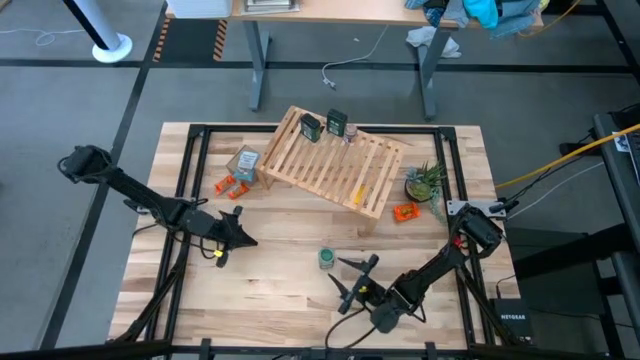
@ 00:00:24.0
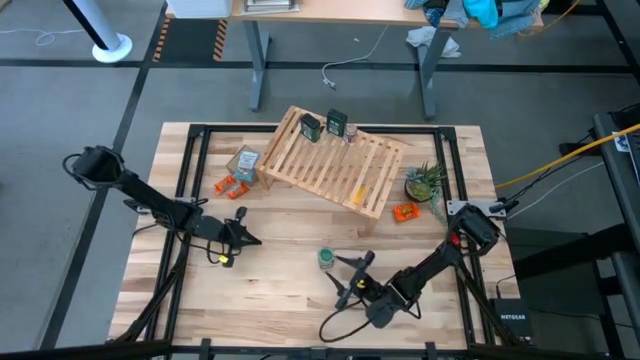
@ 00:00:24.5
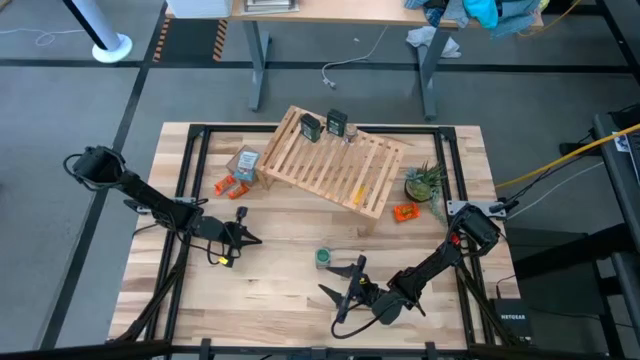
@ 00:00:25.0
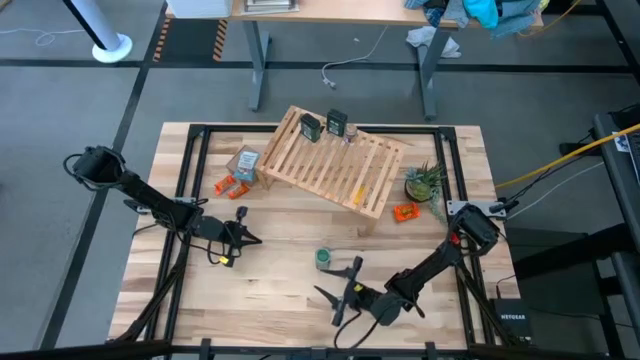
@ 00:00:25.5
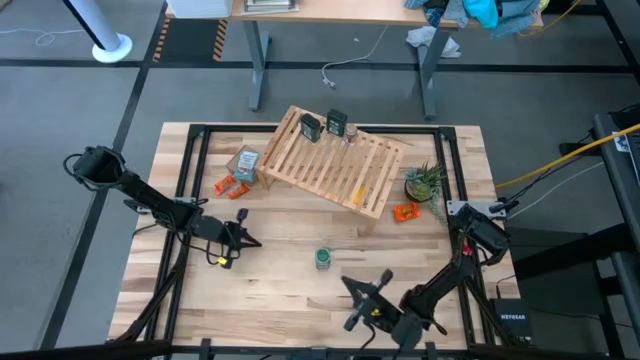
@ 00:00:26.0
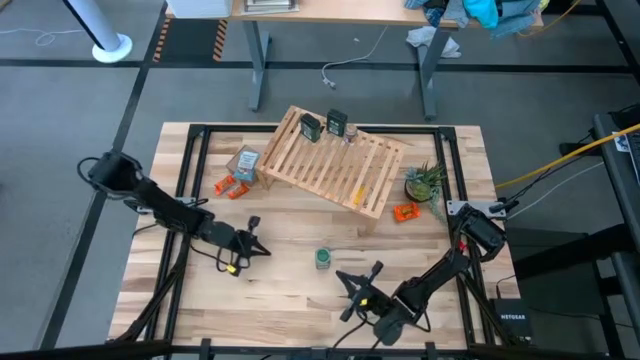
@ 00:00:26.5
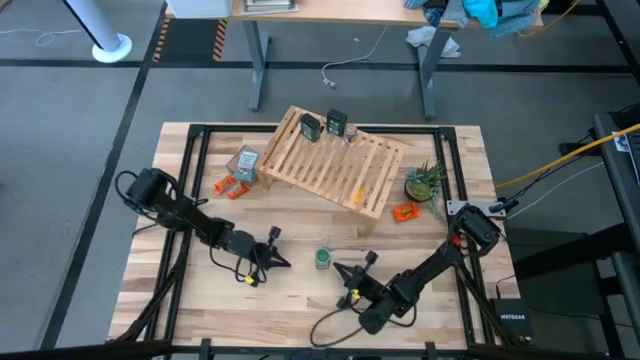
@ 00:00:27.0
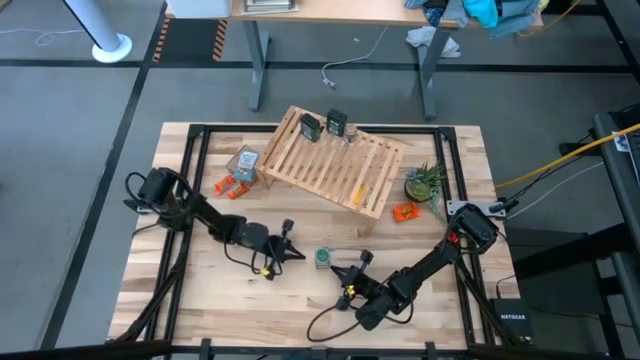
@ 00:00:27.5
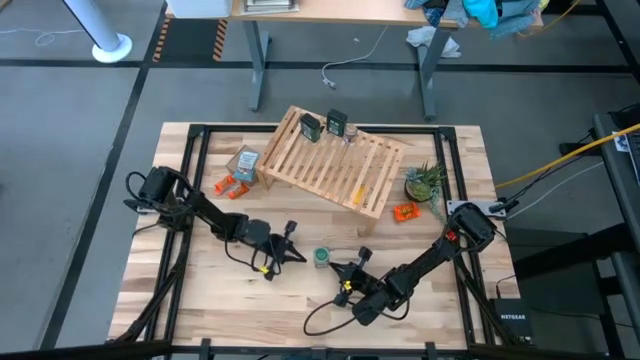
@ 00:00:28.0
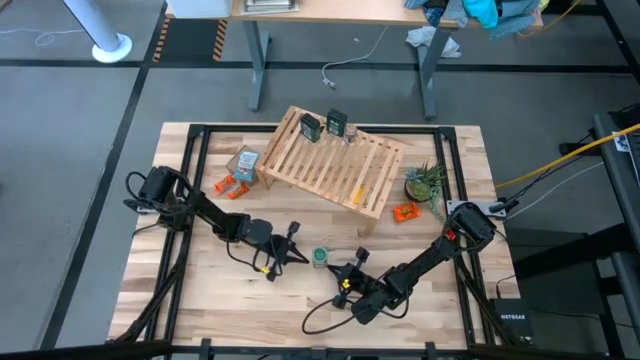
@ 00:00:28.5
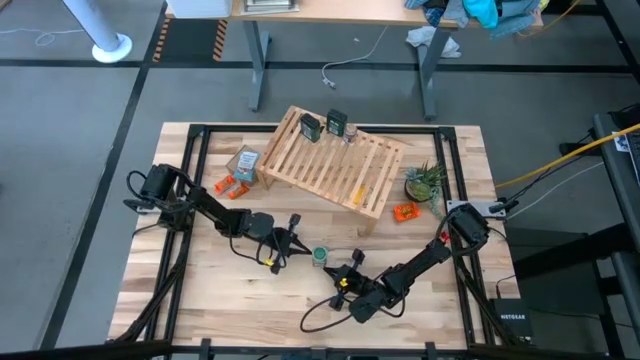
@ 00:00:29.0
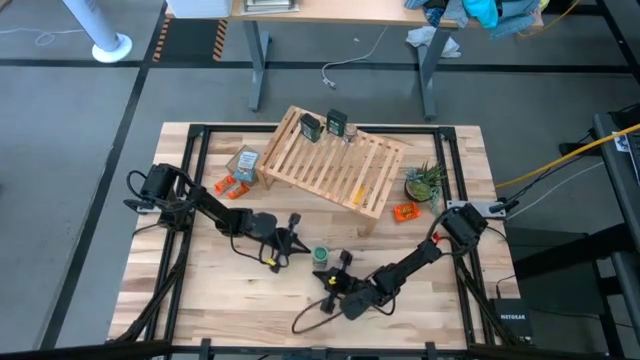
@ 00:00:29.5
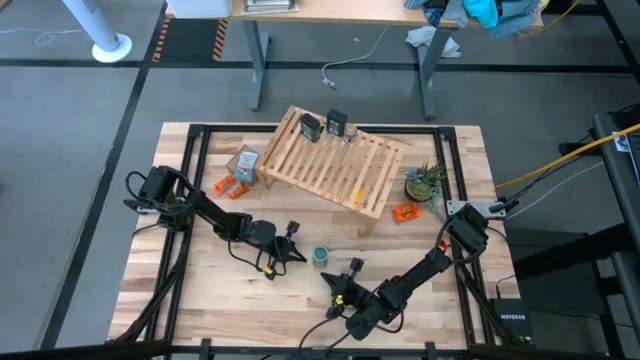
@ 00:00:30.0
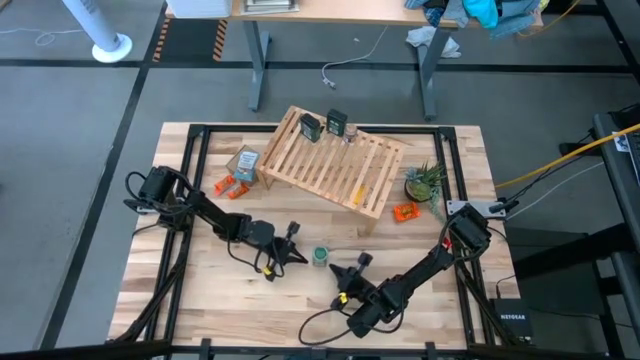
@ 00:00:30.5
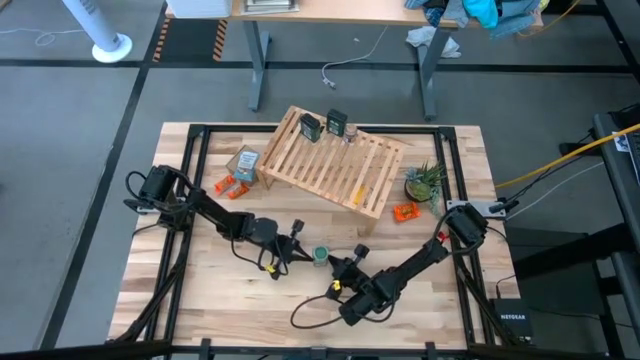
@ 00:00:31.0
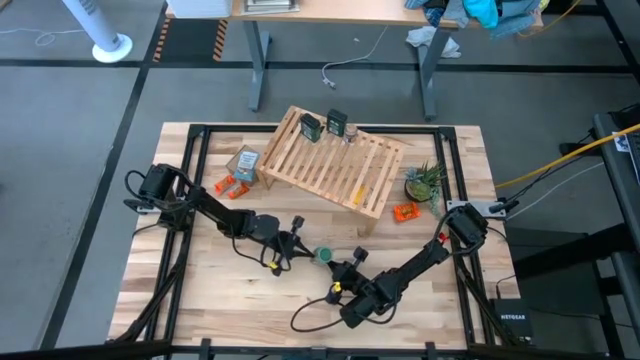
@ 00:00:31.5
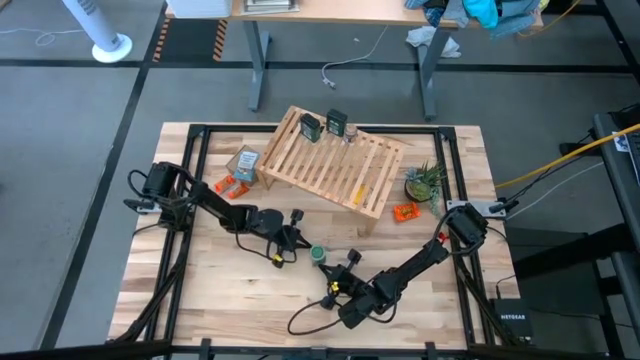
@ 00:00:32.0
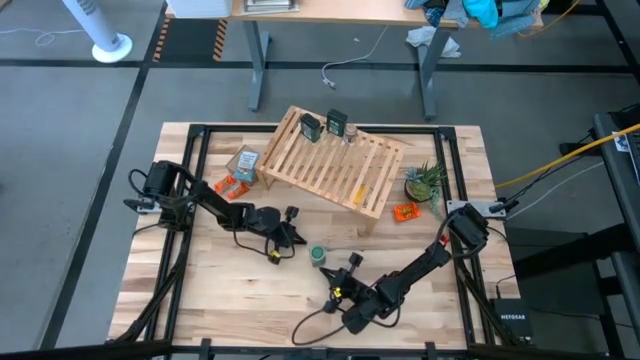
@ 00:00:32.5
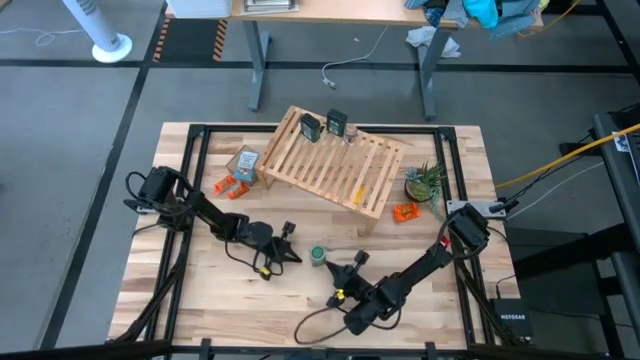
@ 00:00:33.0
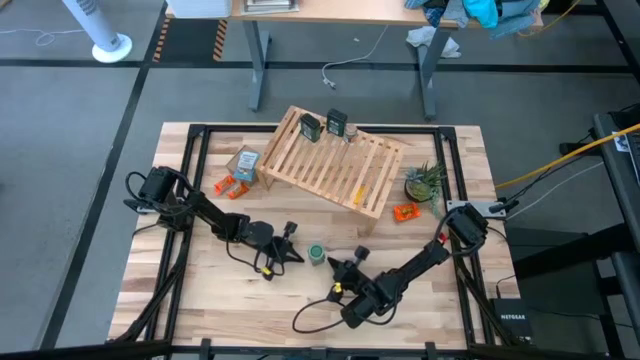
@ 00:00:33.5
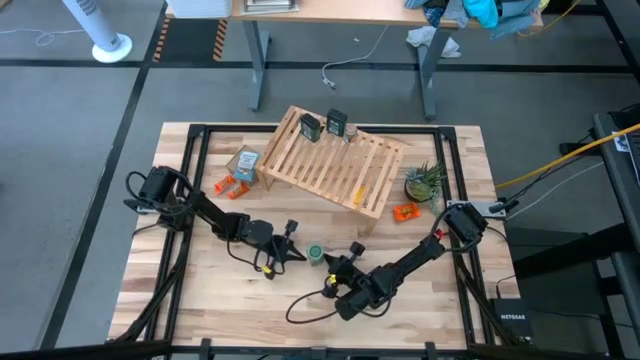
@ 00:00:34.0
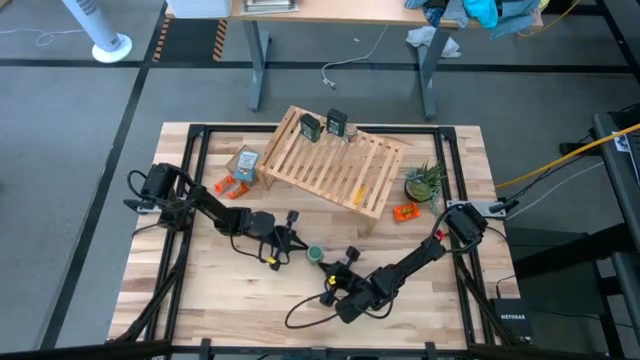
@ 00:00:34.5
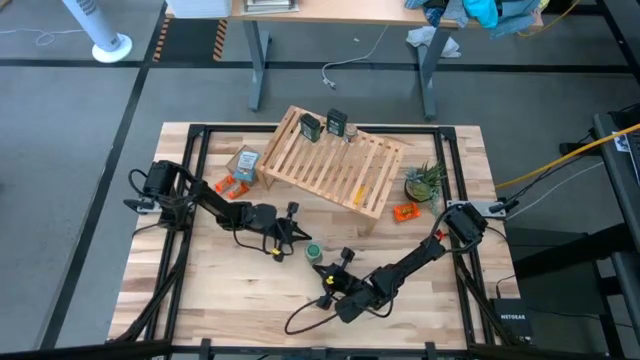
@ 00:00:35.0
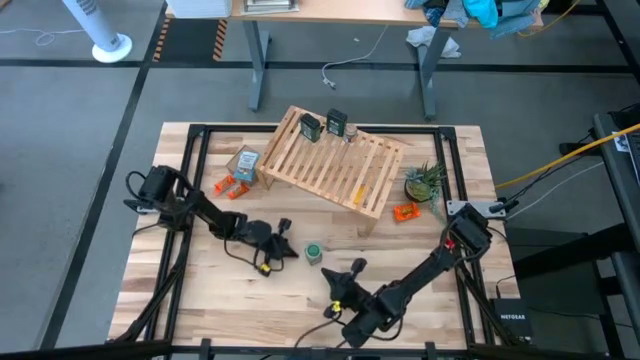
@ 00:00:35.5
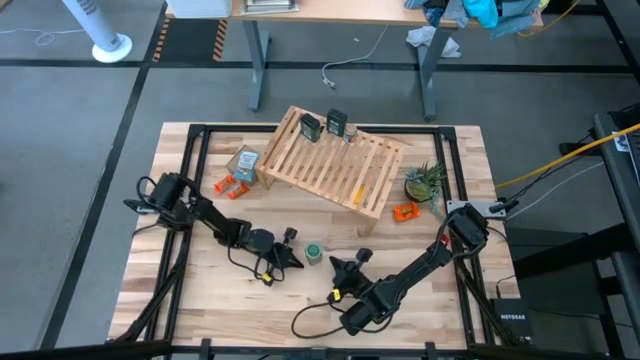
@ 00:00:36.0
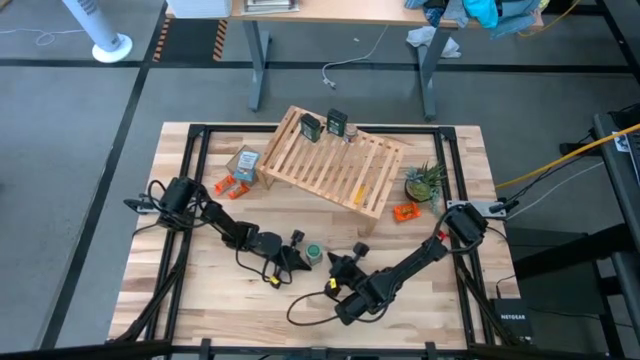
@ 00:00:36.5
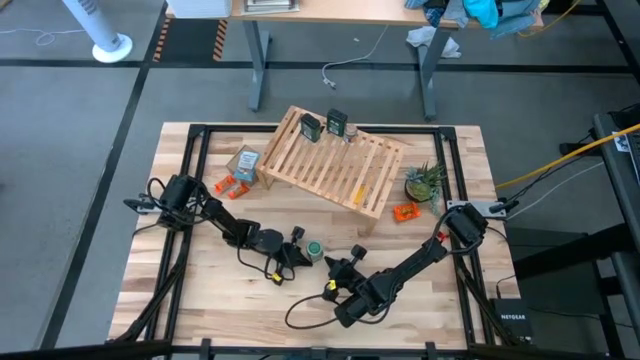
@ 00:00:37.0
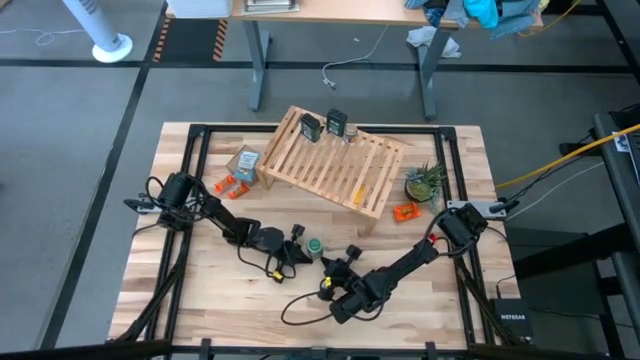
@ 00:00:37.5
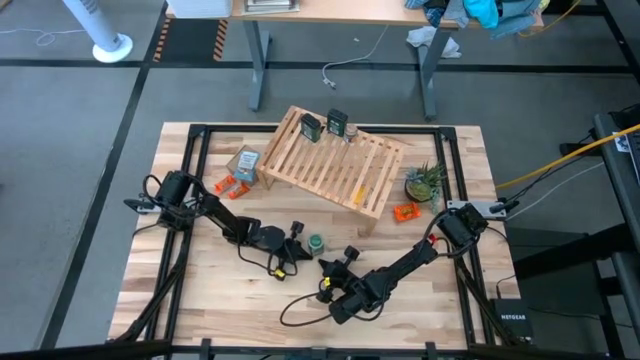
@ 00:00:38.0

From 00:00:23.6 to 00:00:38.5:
Task: Shelf spices
Remove the green seasoning bottle from the shelf

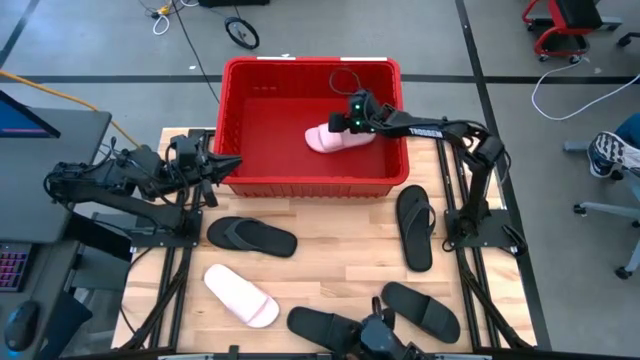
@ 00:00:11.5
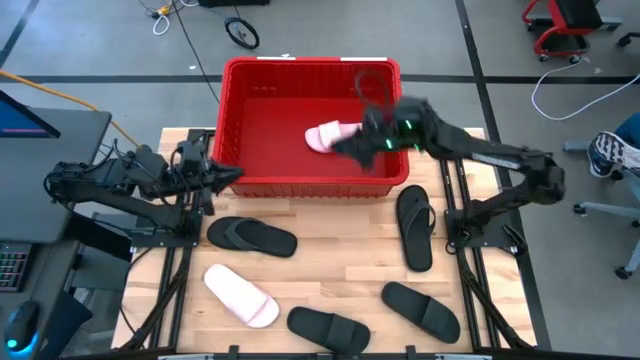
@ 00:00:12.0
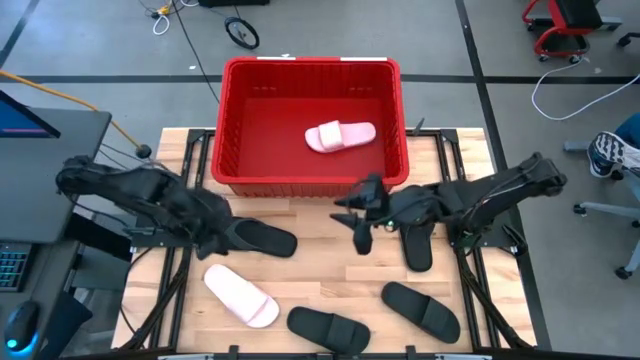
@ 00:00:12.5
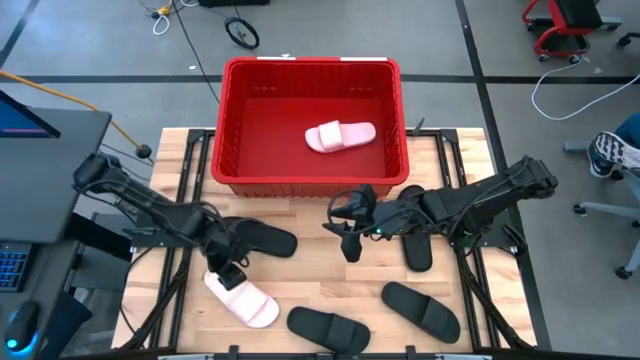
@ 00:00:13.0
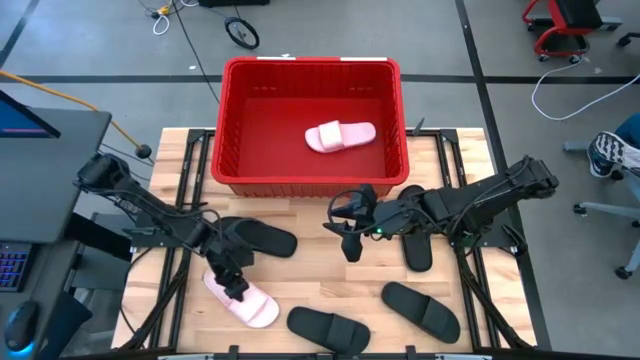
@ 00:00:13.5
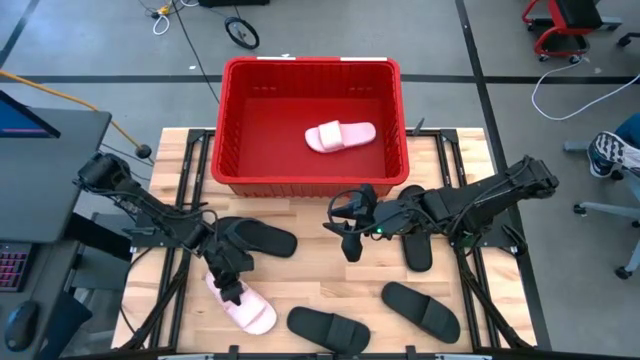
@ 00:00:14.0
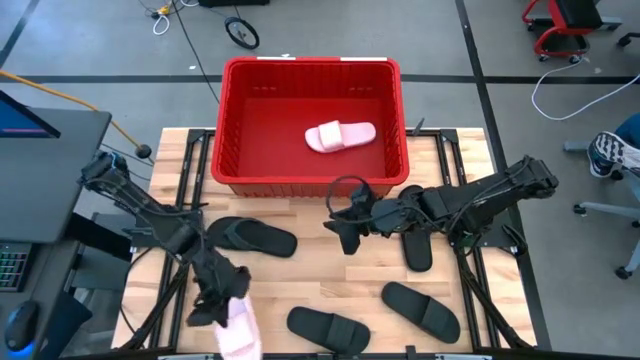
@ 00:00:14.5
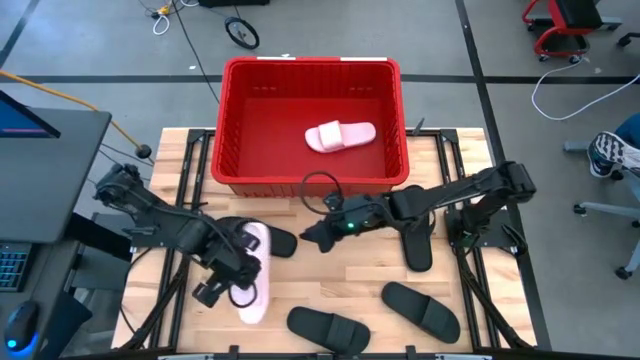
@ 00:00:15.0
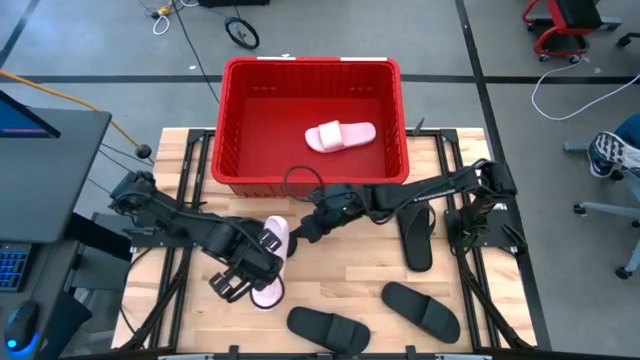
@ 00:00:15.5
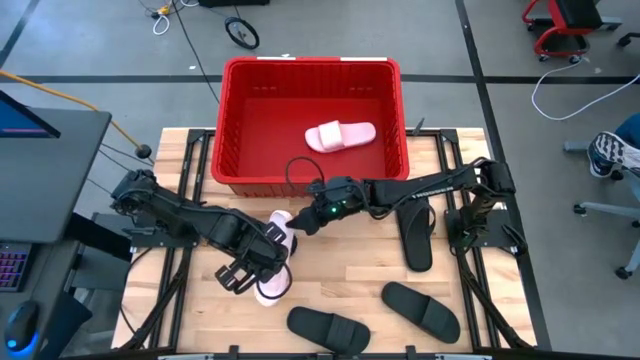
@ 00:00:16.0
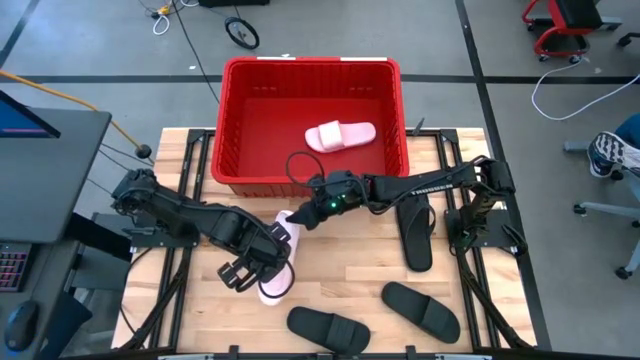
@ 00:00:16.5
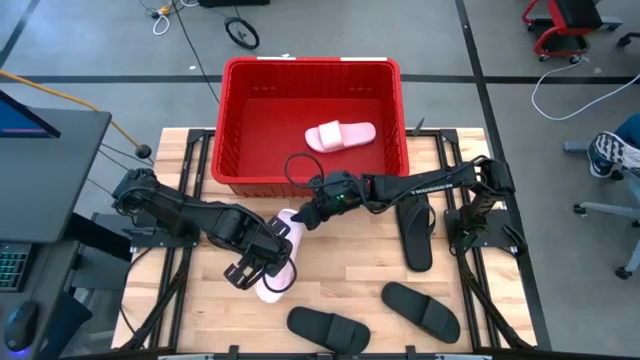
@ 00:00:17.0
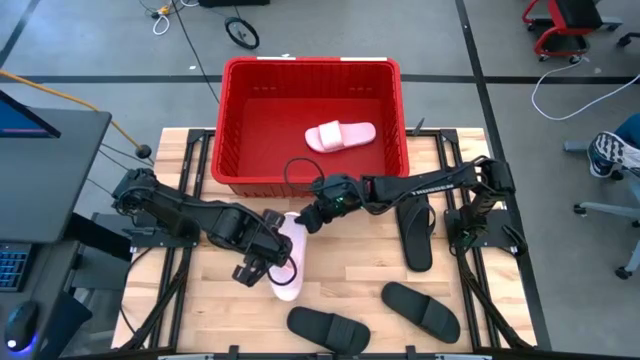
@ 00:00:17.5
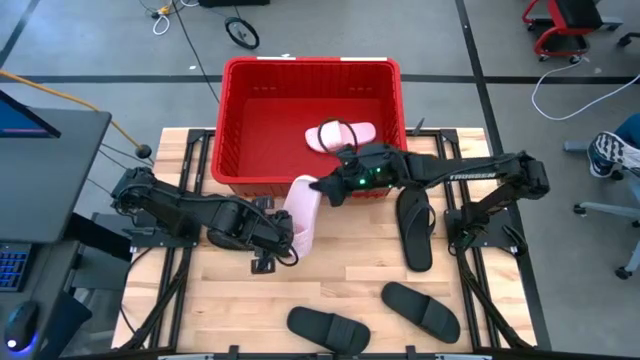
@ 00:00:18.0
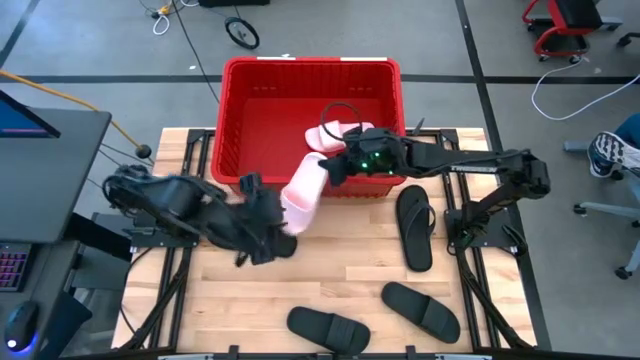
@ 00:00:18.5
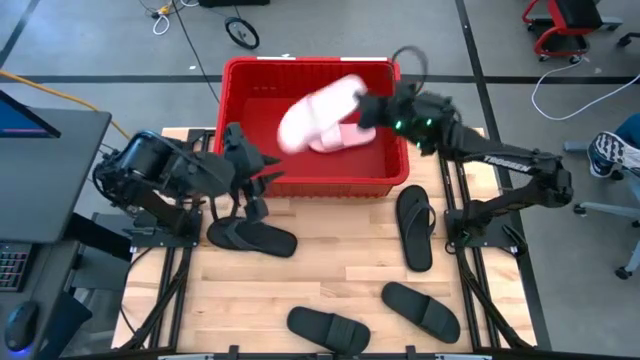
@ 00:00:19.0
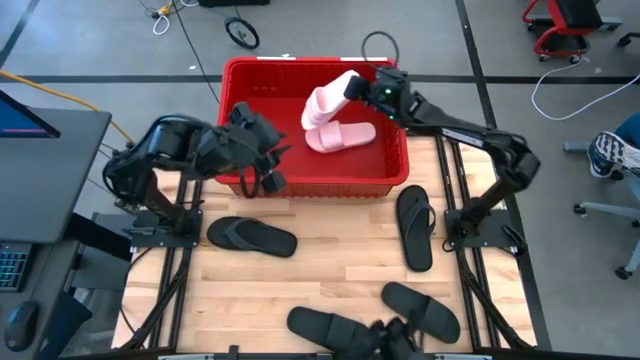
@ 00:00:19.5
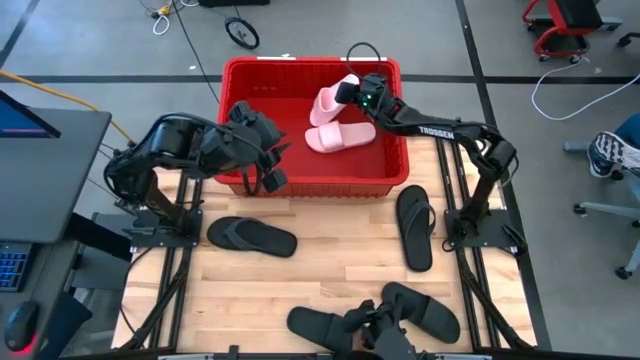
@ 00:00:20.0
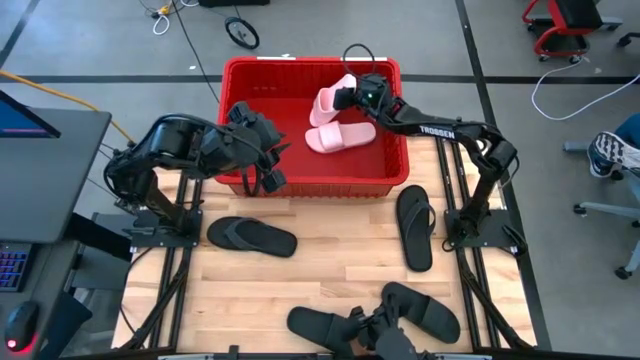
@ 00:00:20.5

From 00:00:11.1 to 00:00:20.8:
Task: Pick and place slides into bin
Put the pink slide into the red bin
